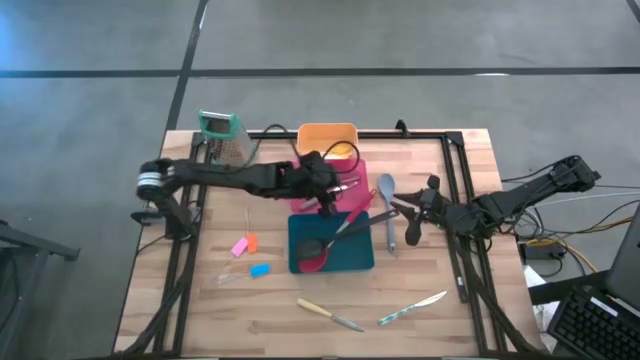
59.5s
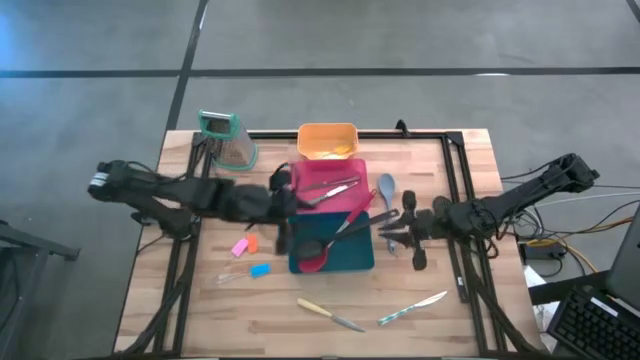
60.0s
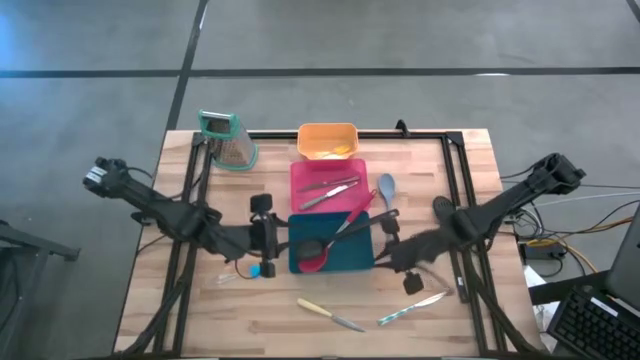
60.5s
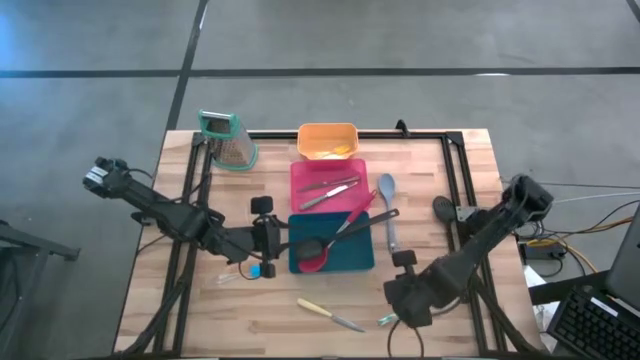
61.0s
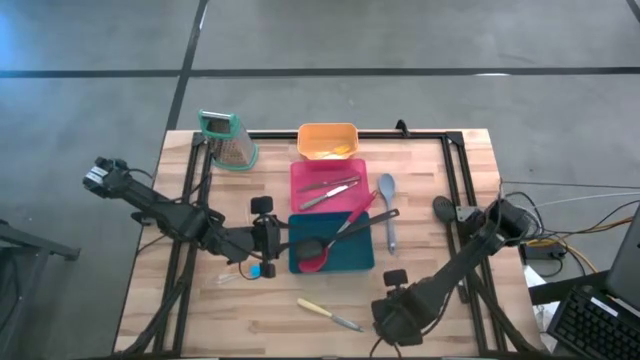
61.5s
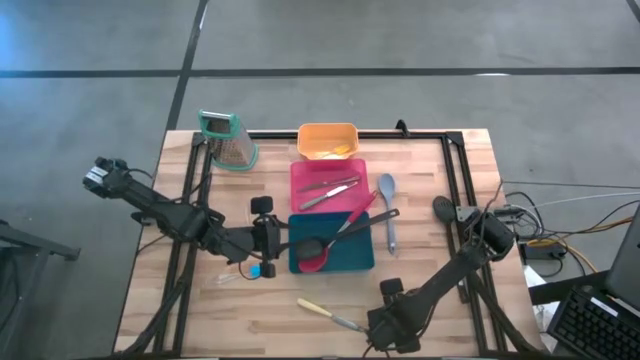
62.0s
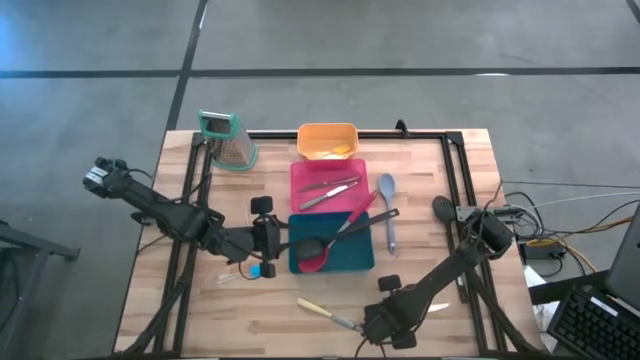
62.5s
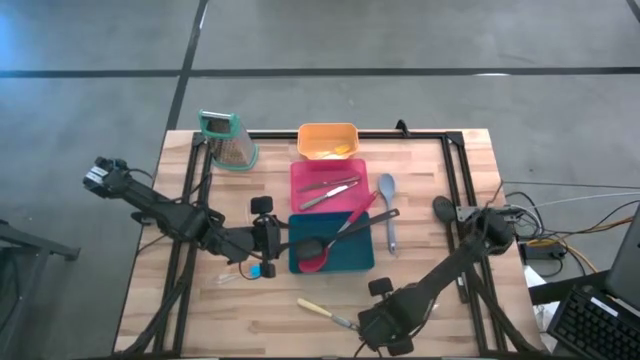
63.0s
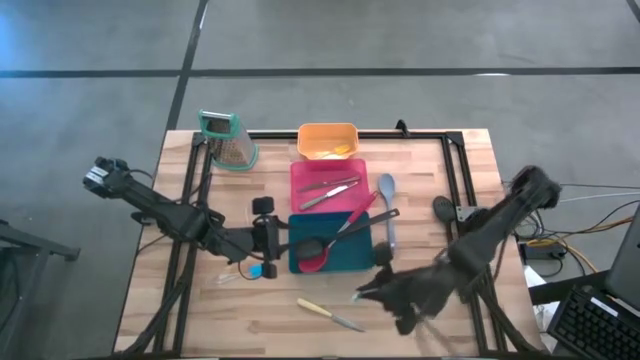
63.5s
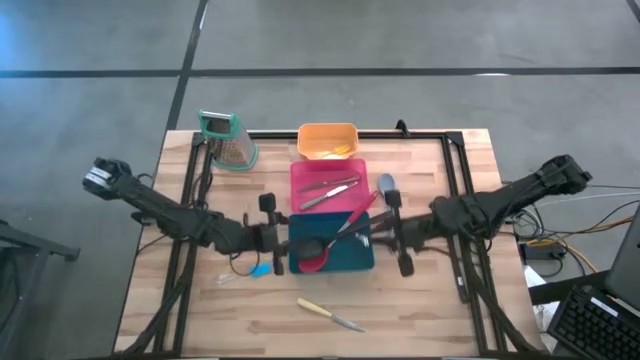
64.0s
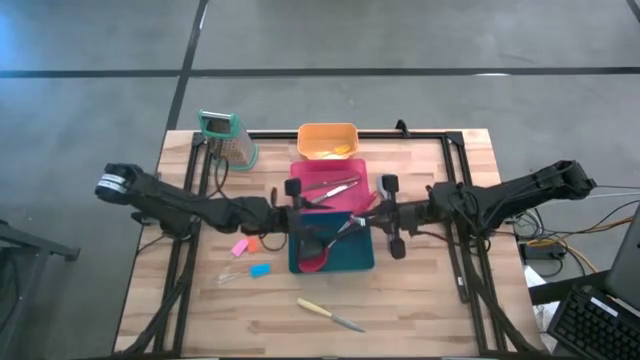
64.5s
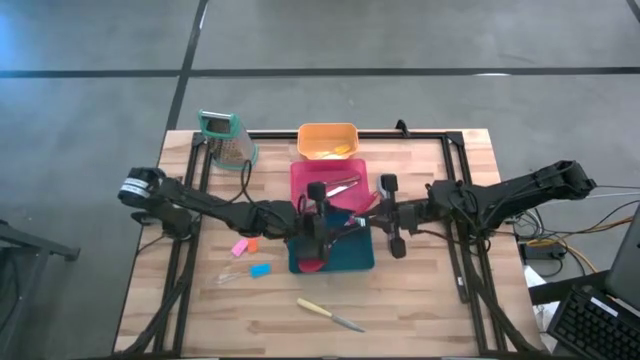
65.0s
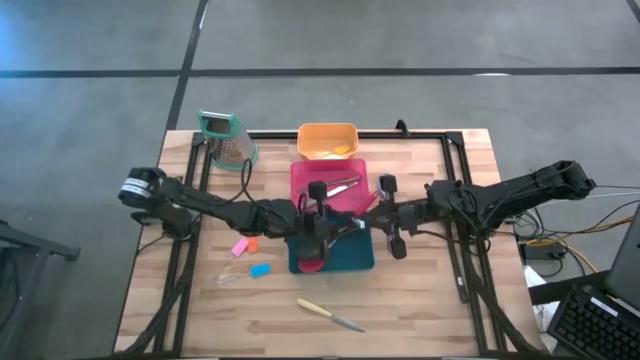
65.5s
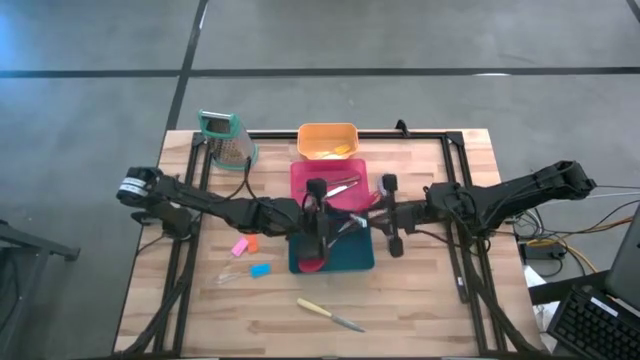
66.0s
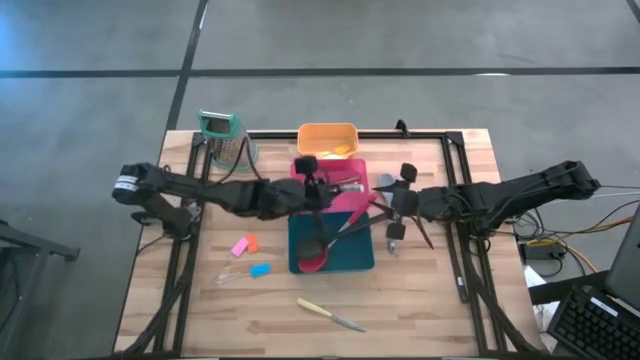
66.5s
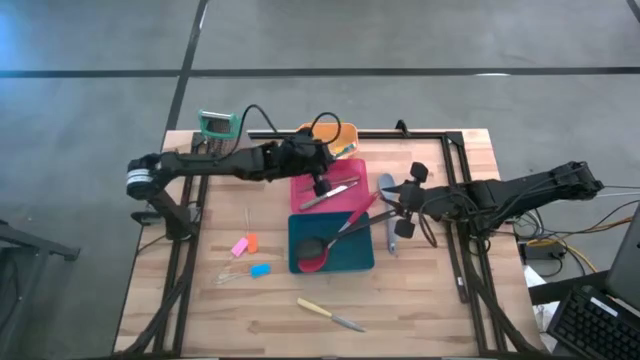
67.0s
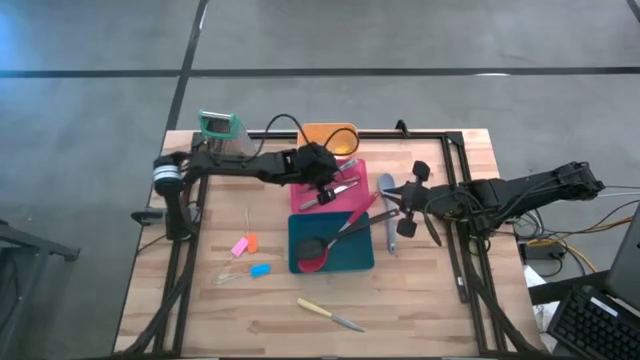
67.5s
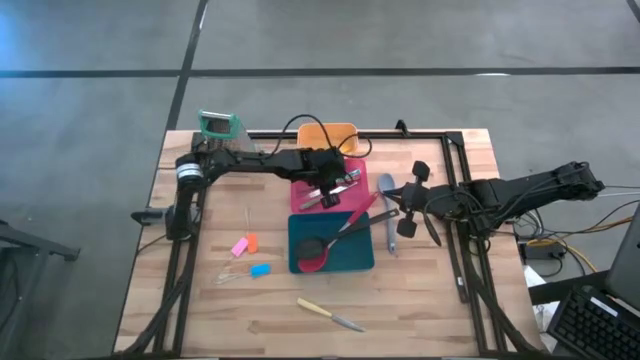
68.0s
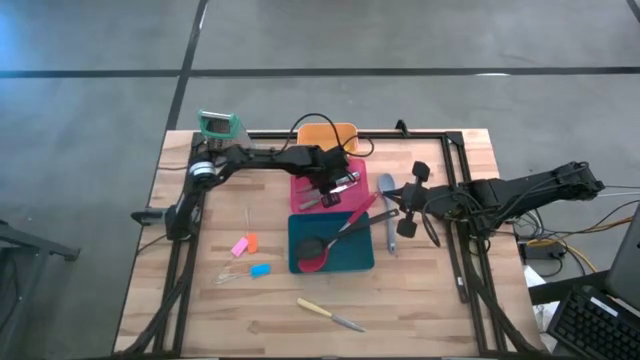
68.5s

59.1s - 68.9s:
Task: Pick & Place Kitchen Items
Put the green knife into the red bin

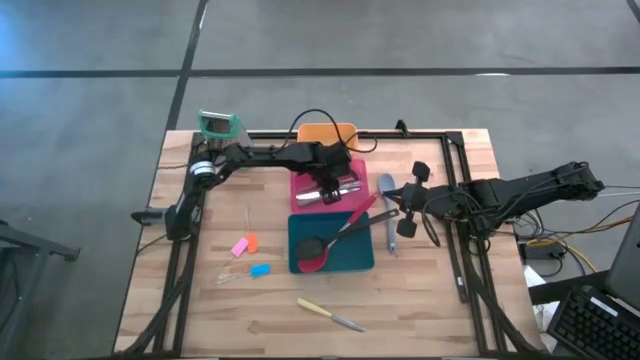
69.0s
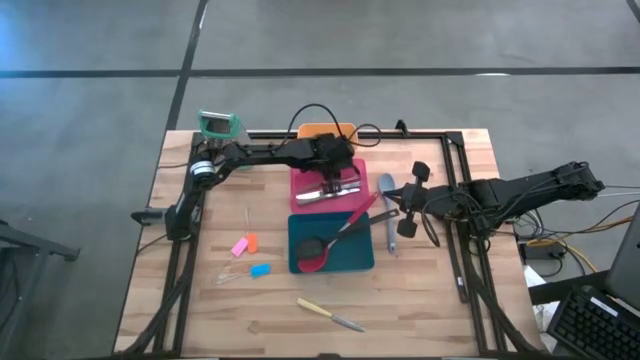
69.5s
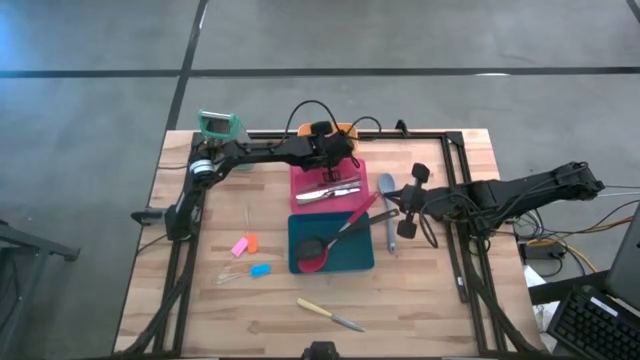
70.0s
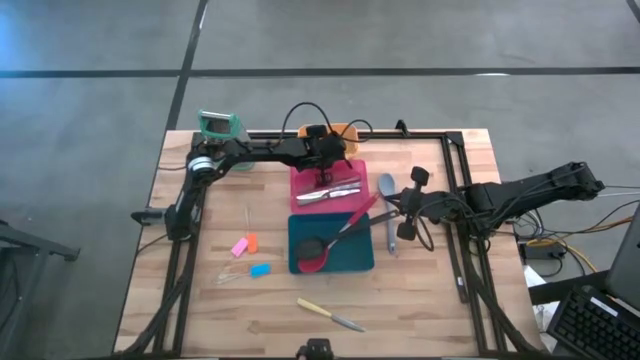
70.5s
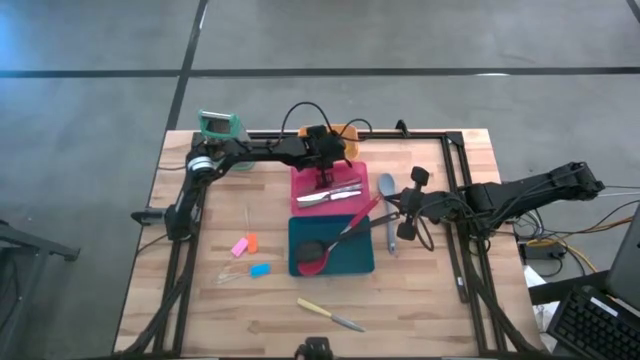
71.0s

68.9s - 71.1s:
Adjust the red bin

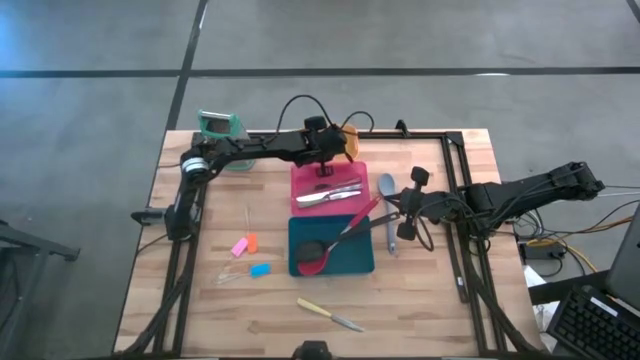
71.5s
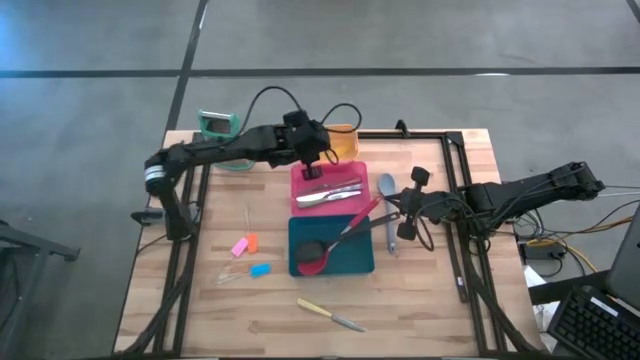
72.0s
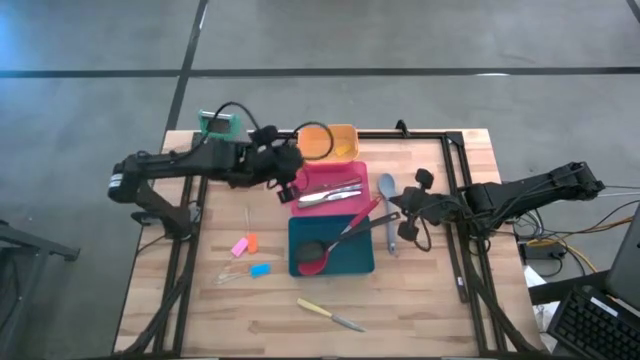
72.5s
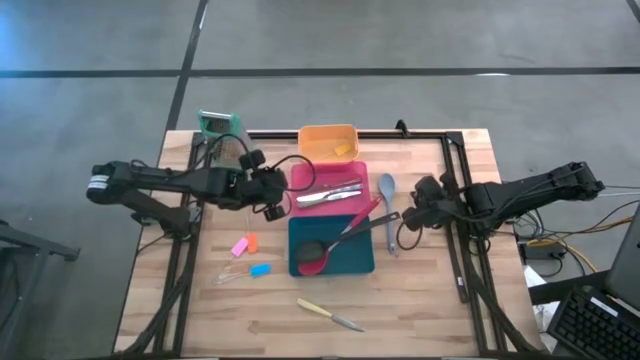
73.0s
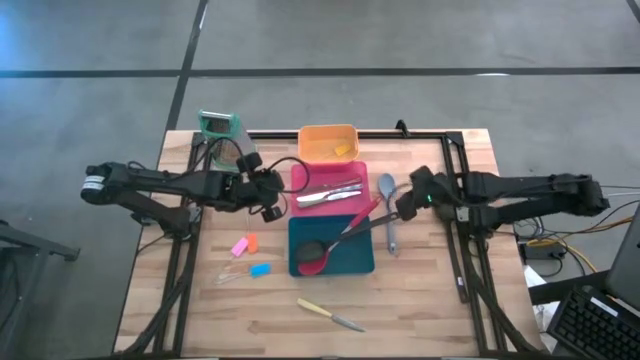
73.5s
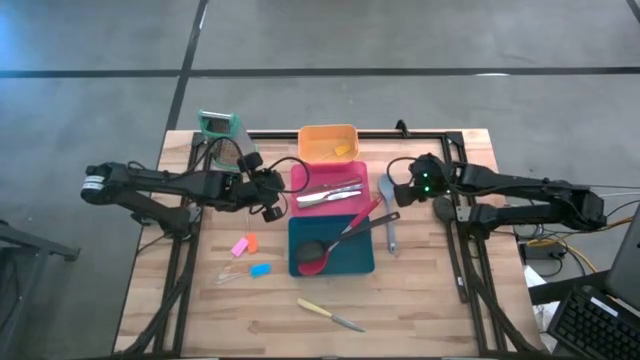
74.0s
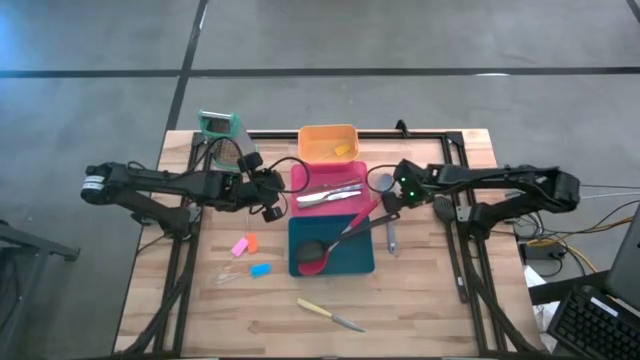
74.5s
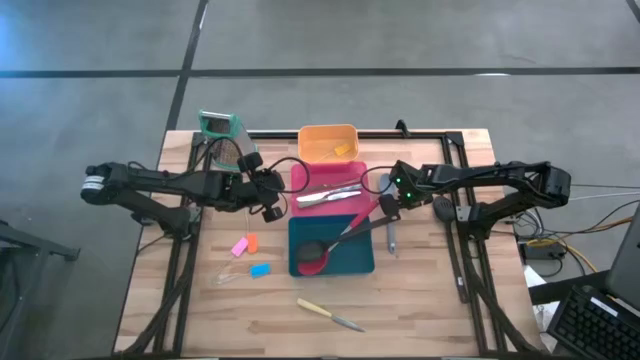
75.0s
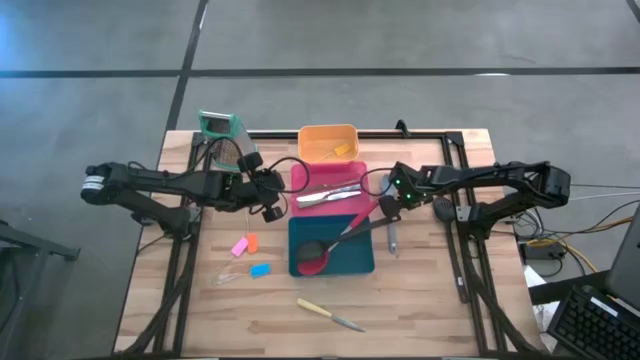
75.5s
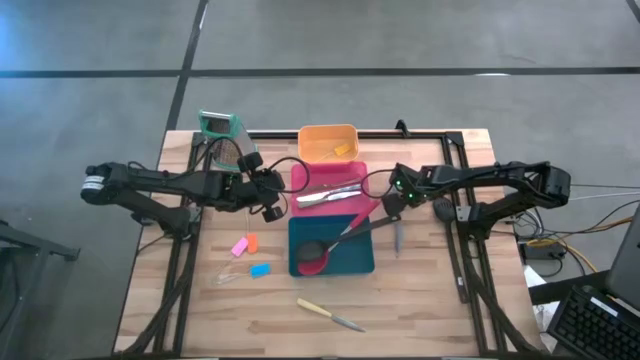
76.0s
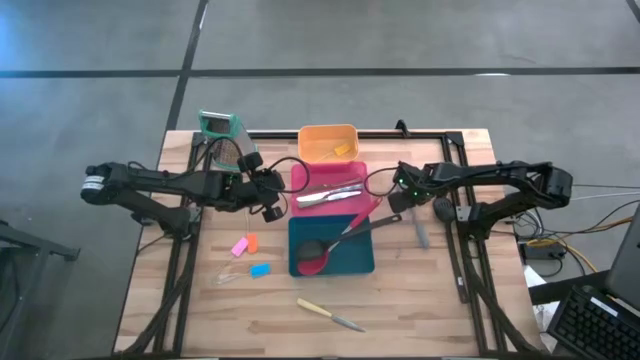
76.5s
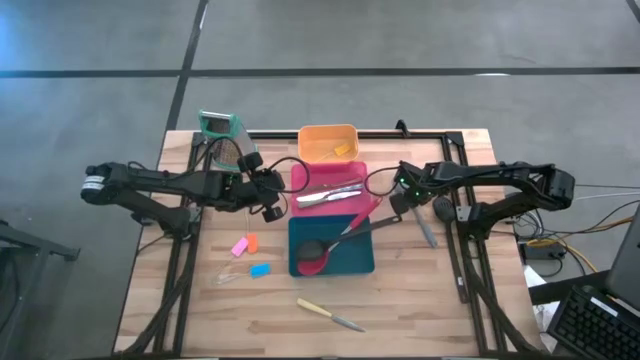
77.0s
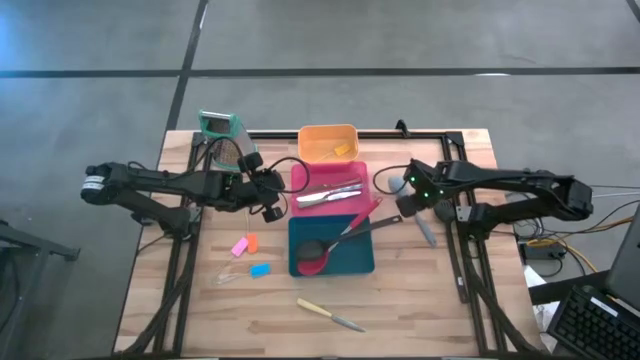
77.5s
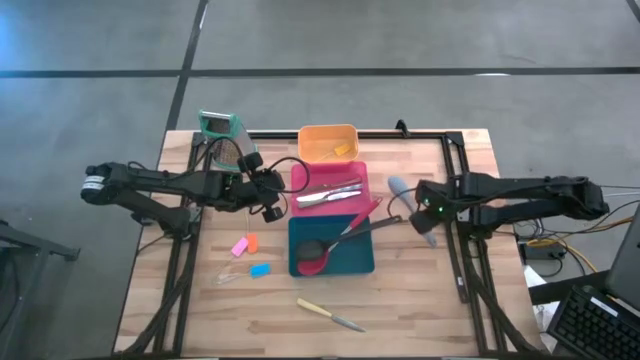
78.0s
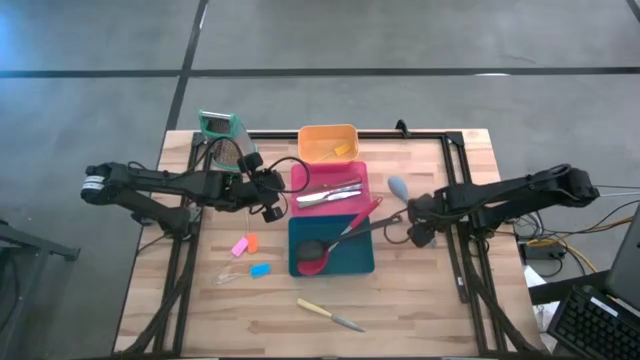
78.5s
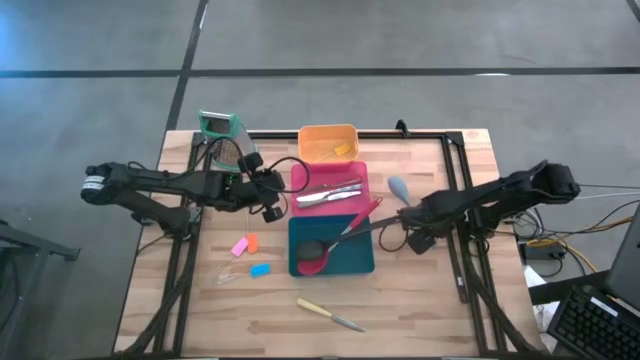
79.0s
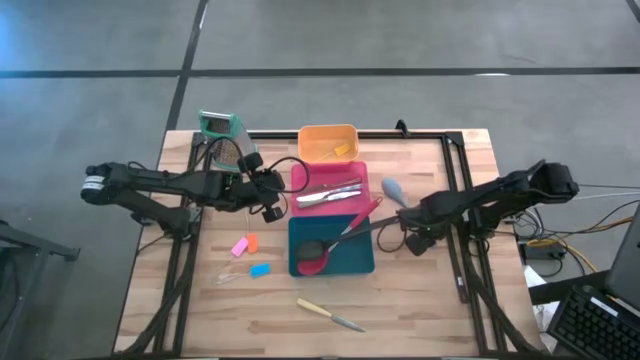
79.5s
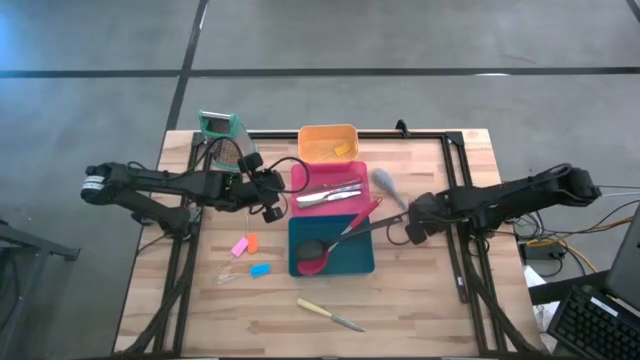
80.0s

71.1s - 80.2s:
Put the gray spoon into the blue bin

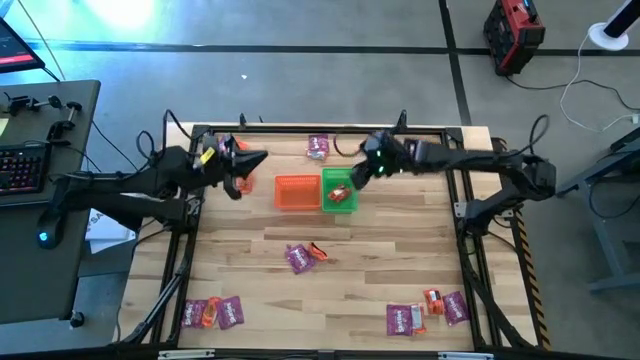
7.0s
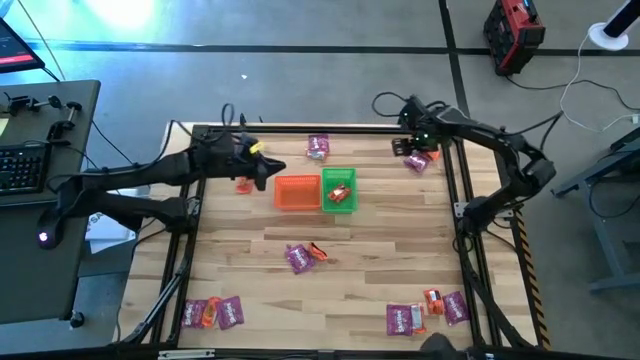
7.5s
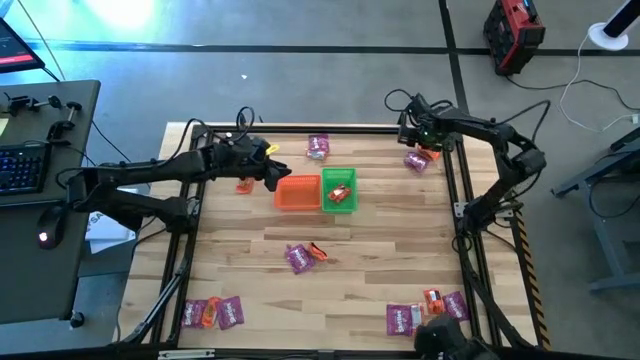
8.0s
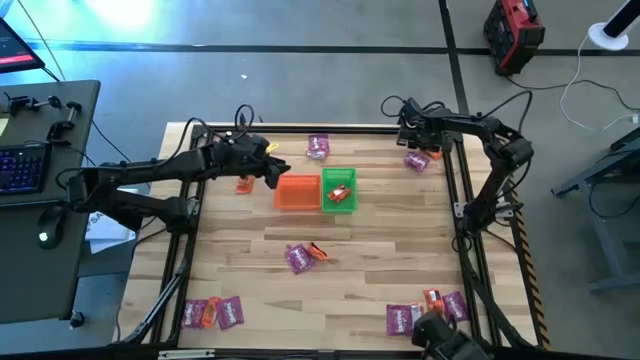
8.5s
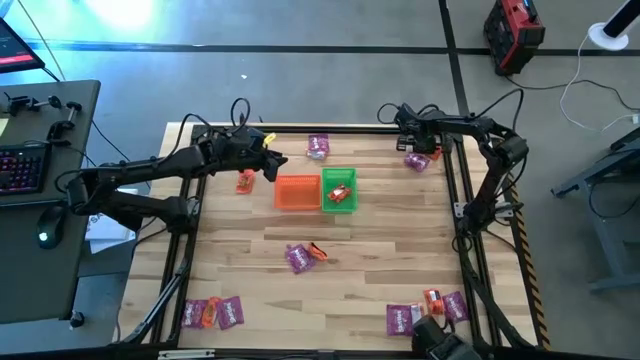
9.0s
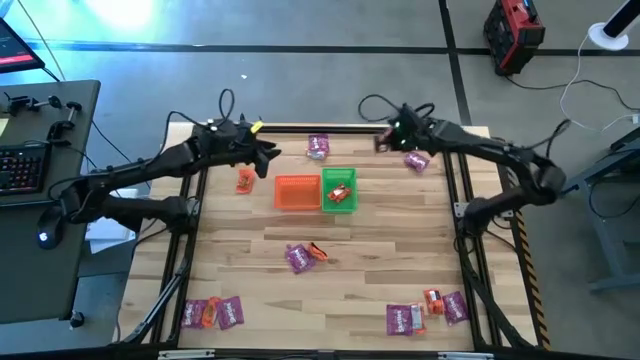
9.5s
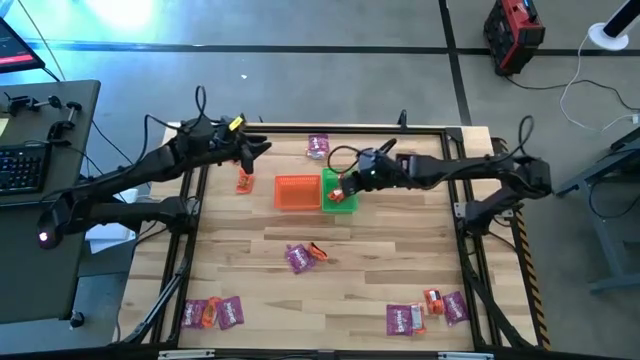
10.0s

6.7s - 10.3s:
Task: Sort candy by brand, put in halloween buckets
Put the orange chocolate into the green bin
